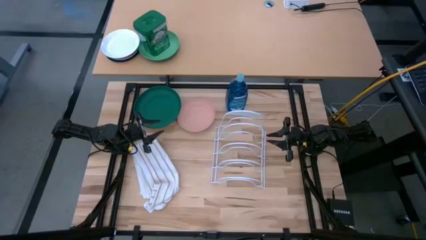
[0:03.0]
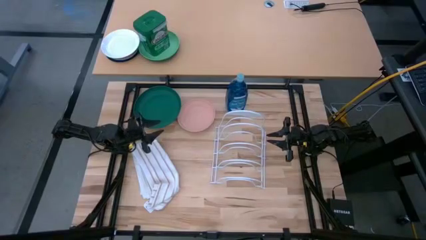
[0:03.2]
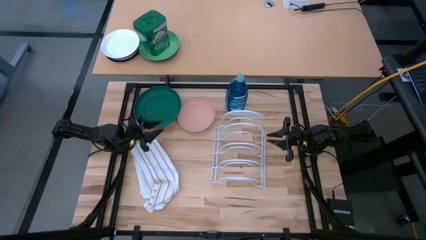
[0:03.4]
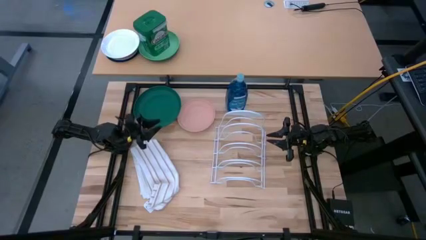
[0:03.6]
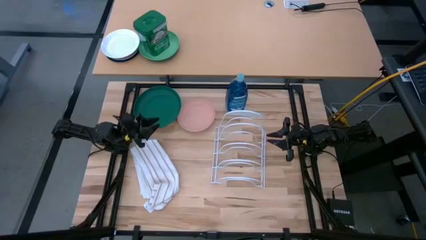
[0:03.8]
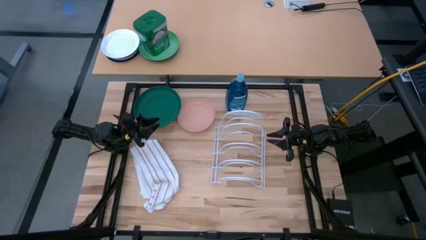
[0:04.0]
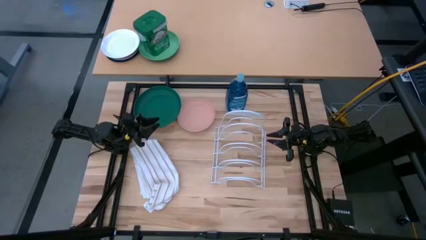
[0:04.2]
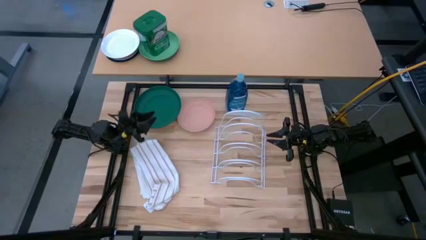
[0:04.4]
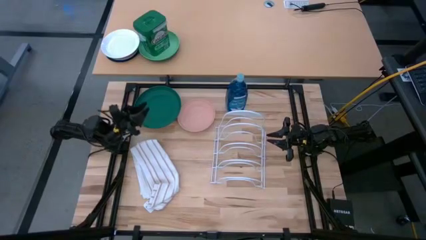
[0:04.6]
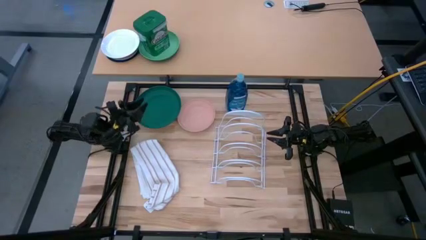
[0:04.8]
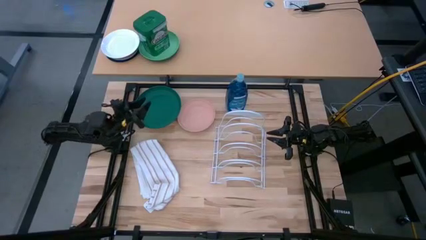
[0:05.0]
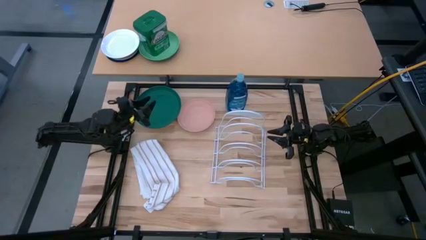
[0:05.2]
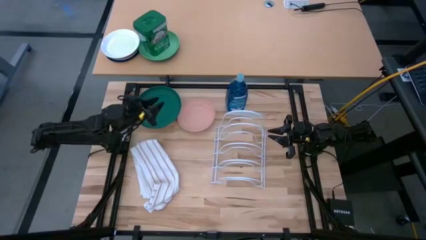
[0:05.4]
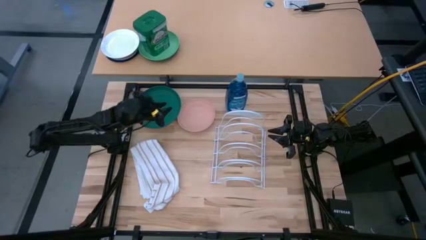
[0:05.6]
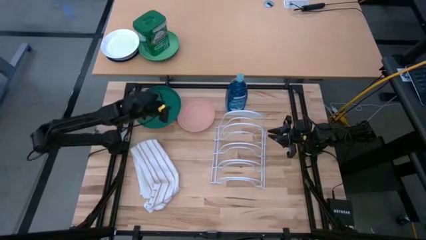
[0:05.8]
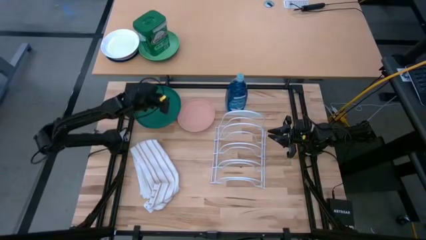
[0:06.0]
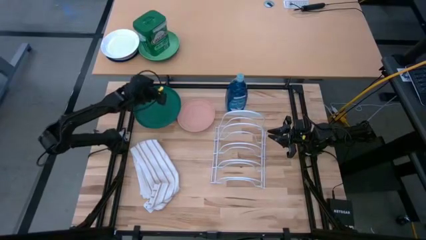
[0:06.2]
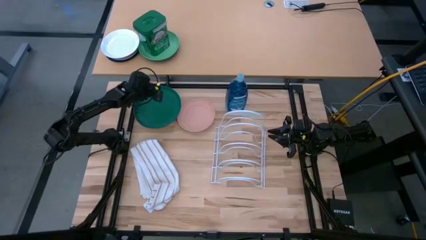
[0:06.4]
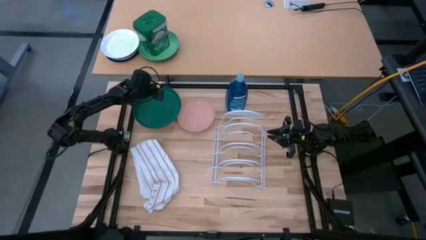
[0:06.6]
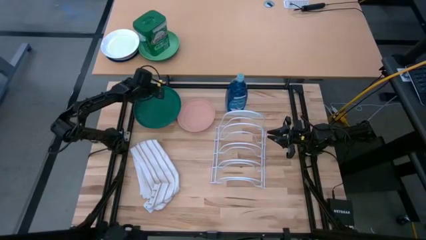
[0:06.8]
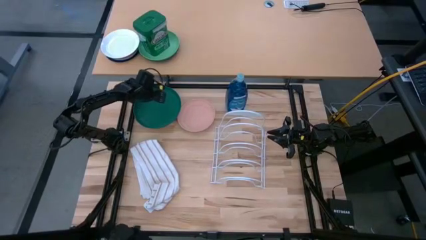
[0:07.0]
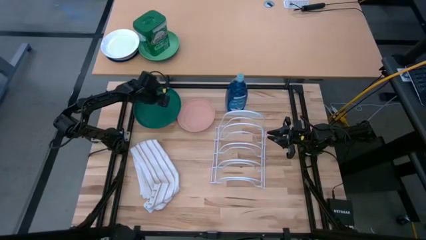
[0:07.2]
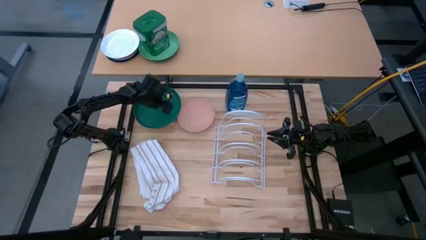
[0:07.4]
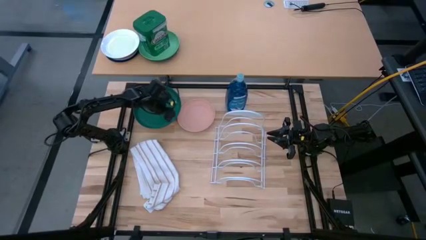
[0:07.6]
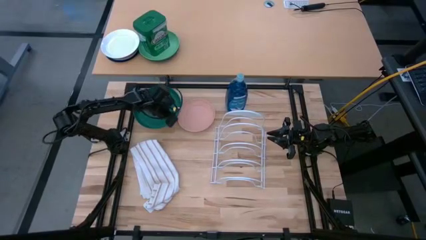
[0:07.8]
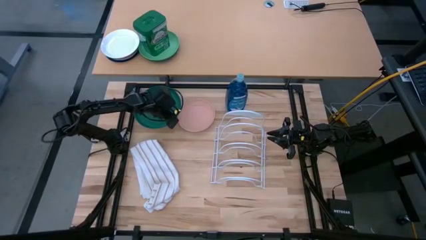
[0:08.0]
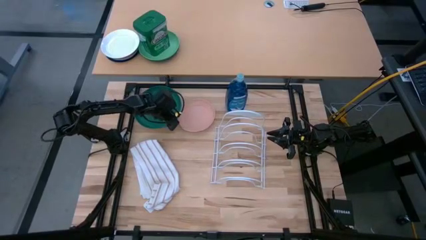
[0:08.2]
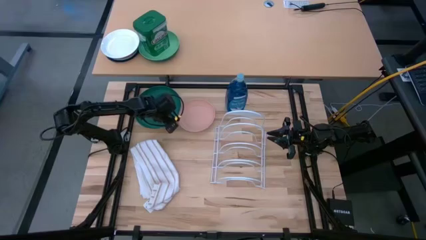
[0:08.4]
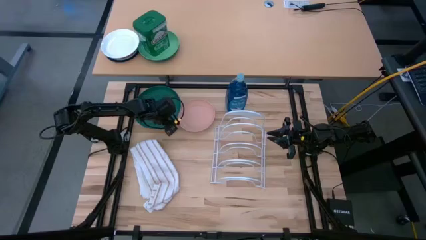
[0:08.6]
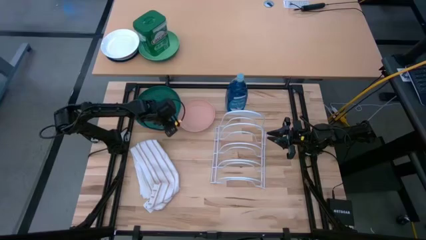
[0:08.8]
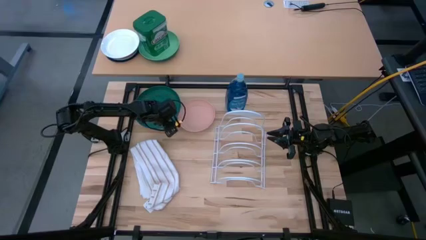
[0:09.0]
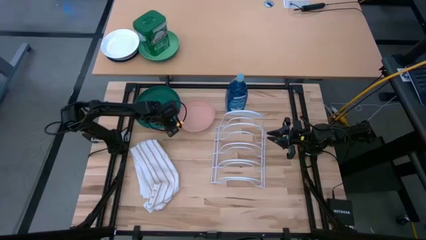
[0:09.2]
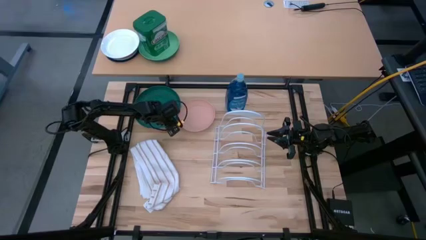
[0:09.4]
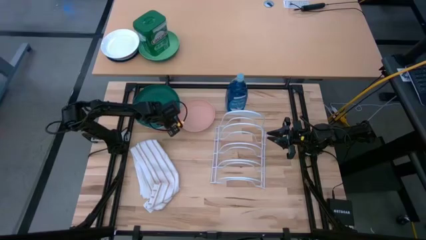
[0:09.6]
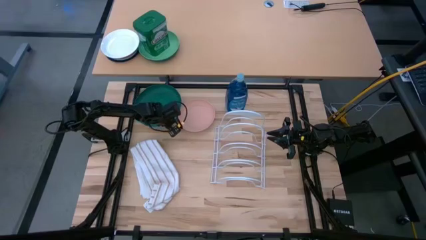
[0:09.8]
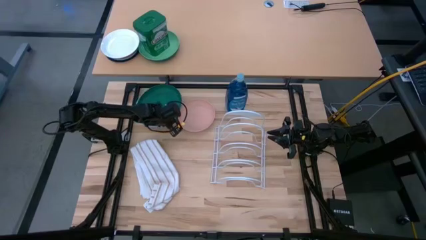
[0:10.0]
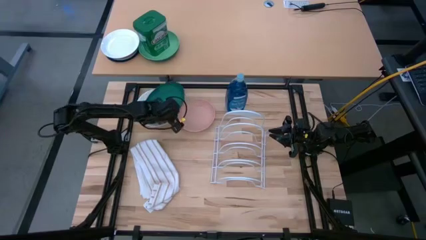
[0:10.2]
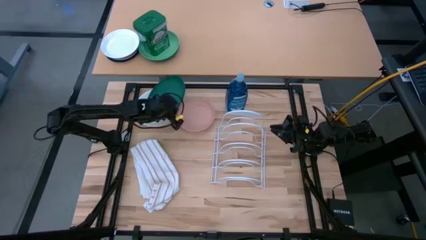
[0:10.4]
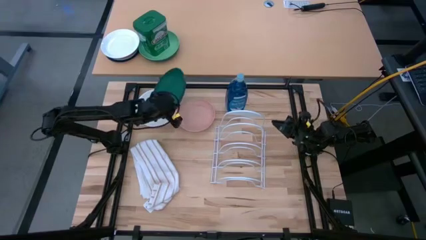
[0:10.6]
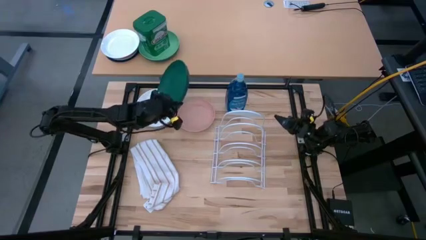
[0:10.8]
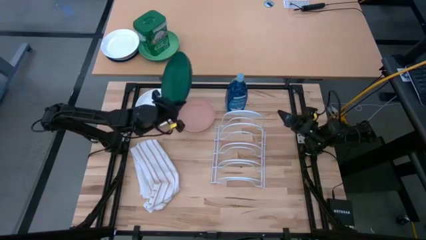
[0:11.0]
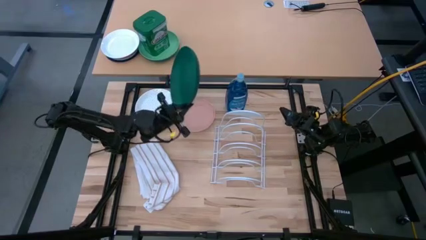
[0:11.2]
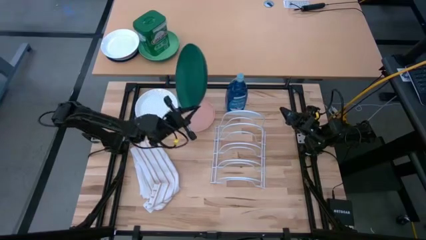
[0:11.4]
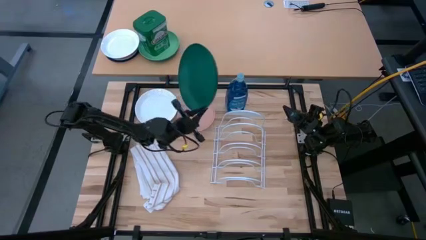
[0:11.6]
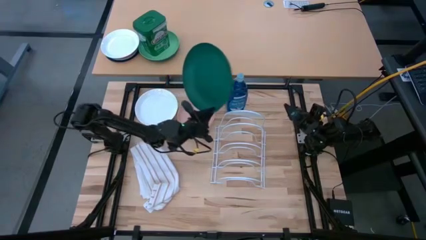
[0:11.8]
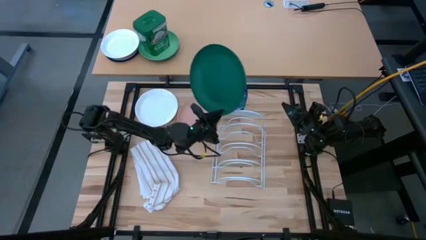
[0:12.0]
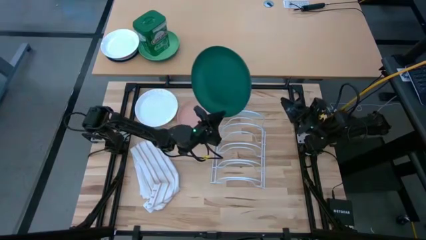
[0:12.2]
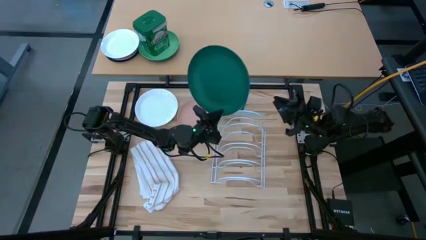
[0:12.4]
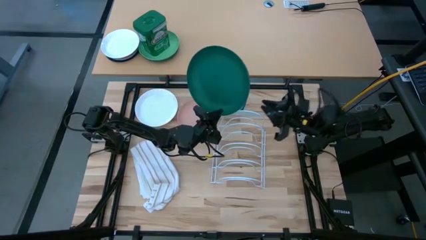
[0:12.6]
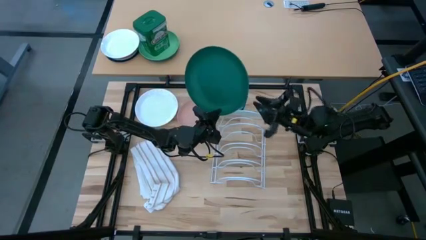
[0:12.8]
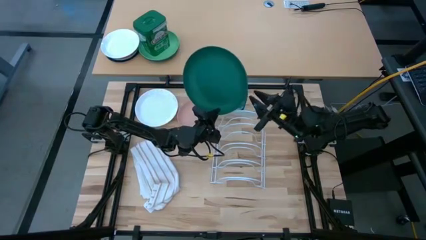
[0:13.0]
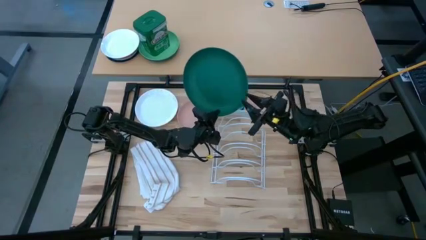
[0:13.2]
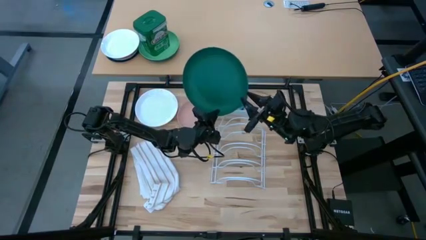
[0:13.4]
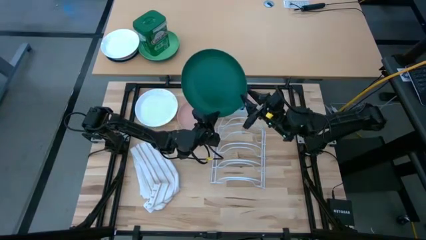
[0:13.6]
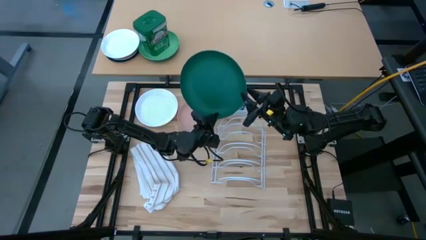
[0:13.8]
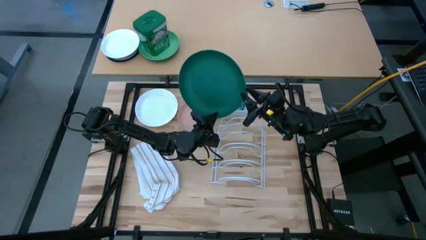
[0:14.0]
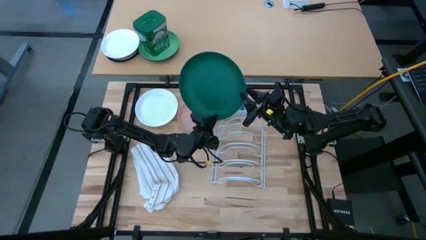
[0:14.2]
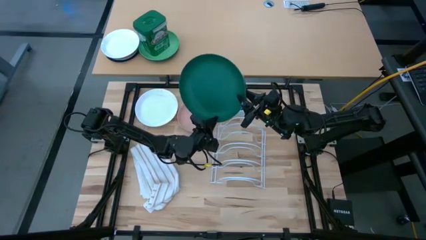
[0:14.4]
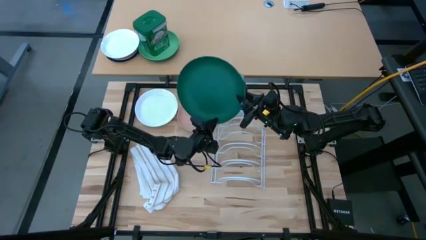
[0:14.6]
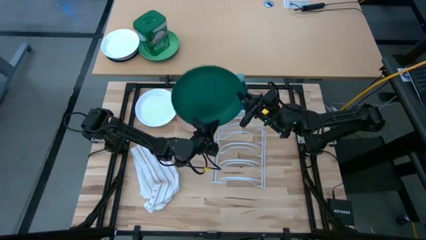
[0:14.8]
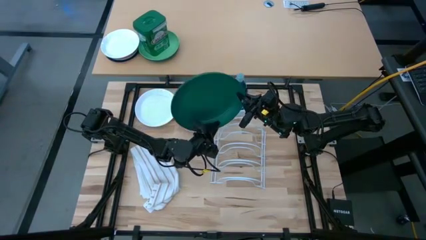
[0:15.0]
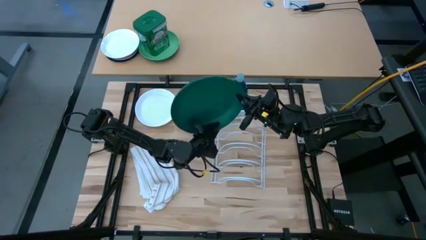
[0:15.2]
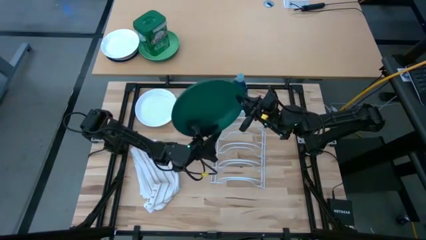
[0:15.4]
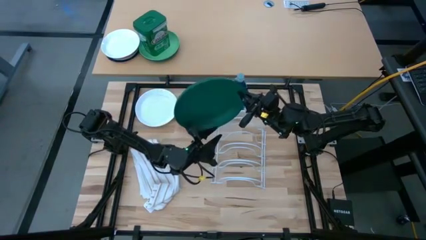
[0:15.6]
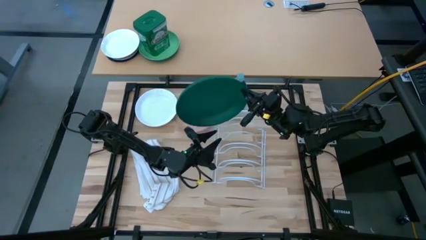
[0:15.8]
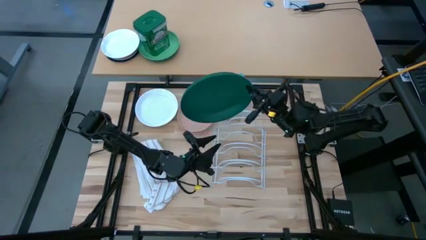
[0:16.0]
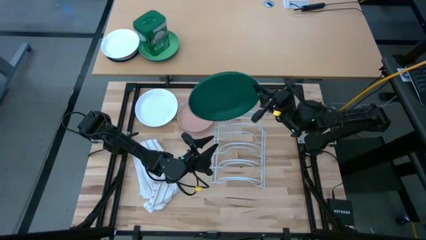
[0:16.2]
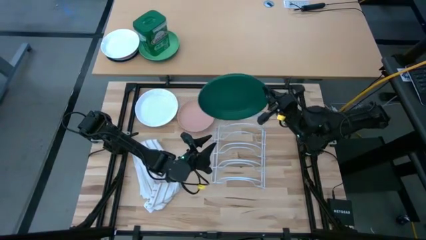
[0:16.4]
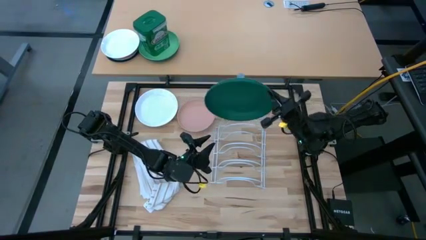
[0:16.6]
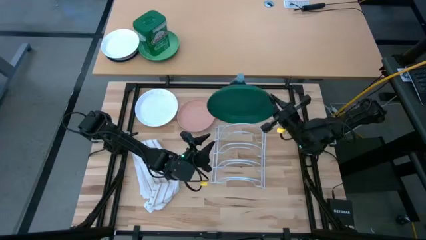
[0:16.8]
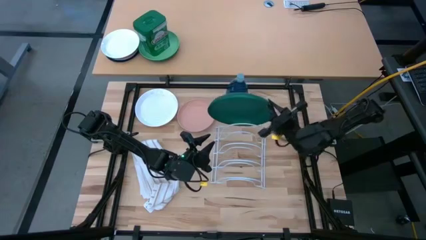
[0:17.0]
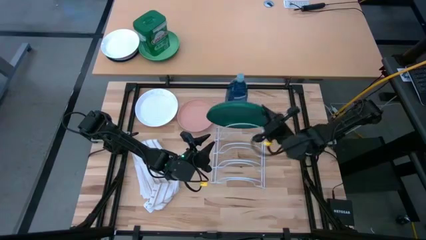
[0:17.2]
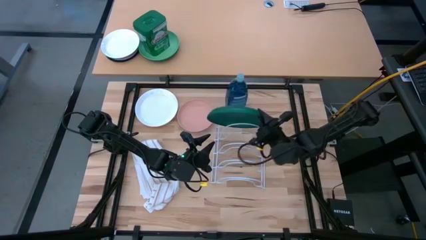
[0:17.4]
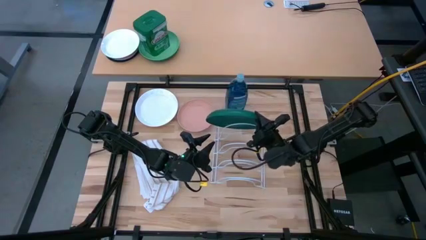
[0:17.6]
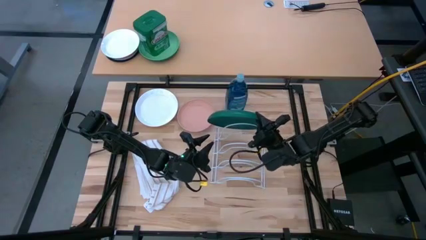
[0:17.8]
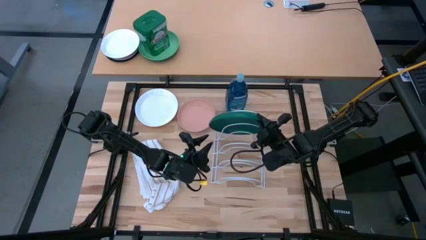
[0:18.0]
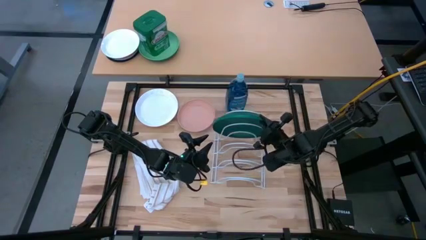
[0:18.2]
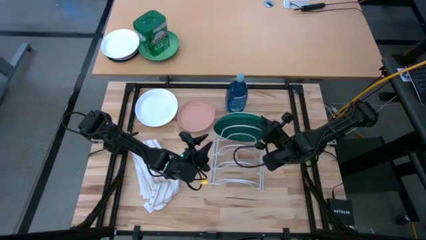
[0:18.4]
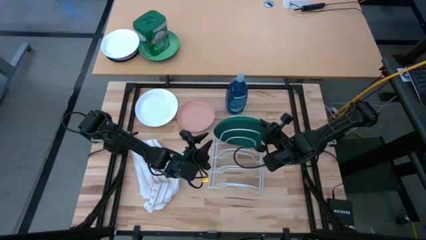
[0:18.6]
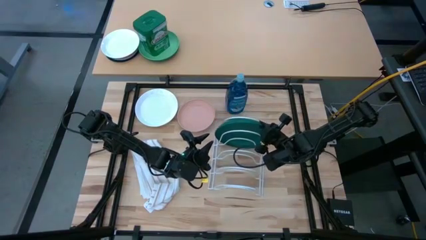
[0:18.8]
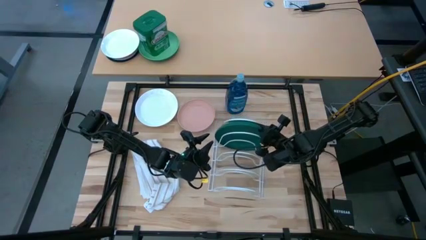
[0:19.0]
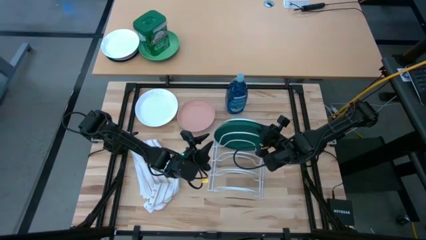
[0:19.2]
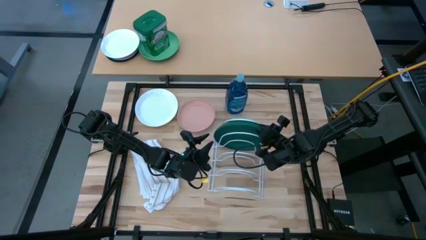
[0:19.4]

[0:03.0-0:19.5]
Task: Sort dishes
Put the green plate in the dish rack
